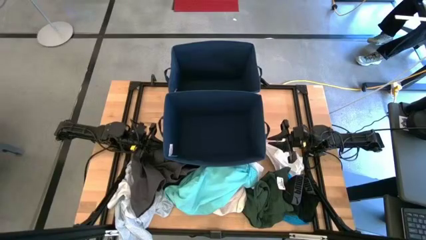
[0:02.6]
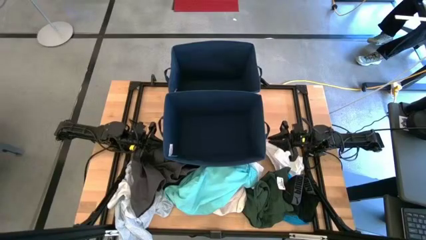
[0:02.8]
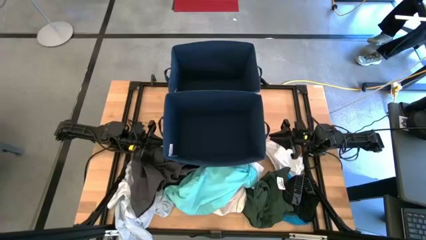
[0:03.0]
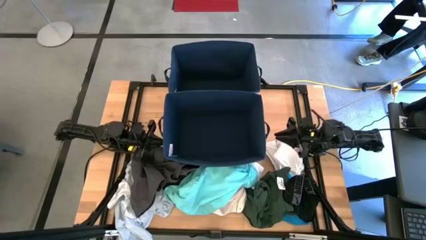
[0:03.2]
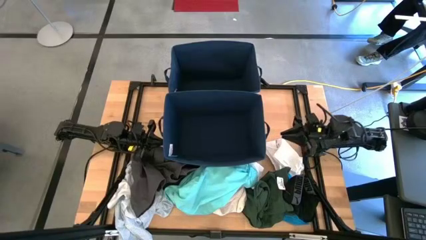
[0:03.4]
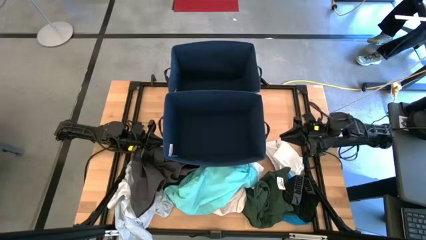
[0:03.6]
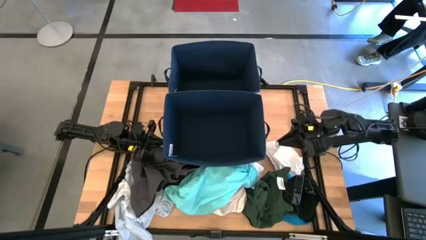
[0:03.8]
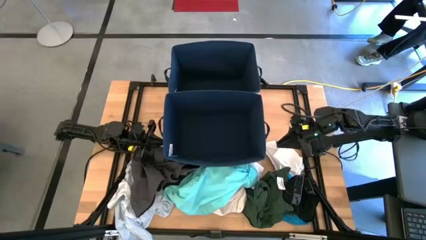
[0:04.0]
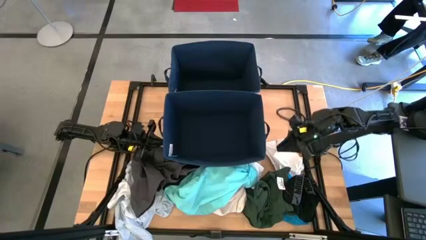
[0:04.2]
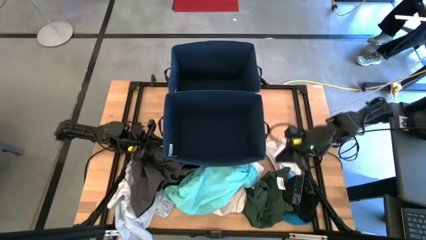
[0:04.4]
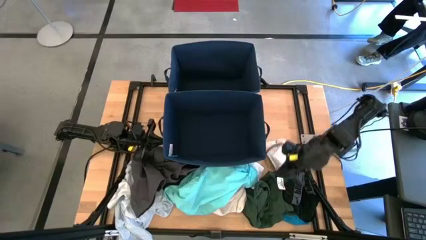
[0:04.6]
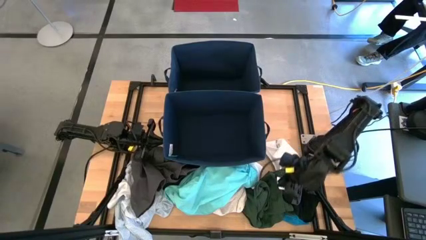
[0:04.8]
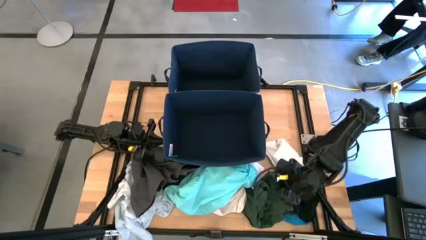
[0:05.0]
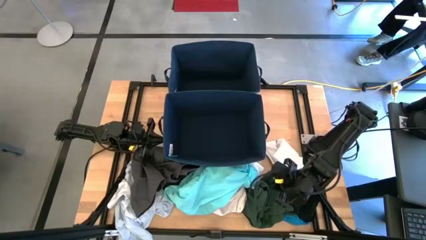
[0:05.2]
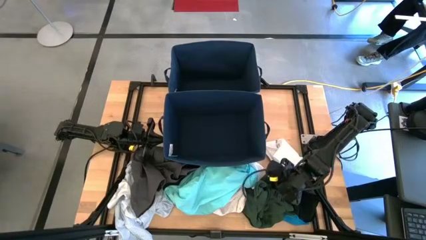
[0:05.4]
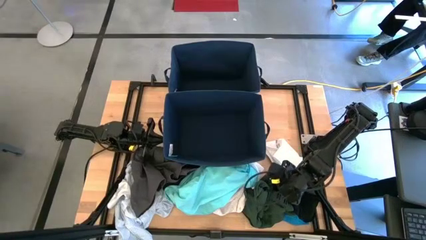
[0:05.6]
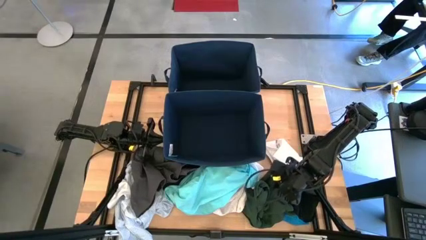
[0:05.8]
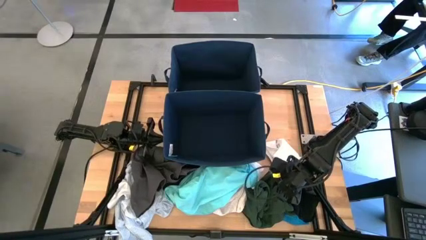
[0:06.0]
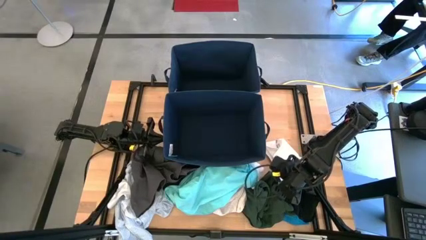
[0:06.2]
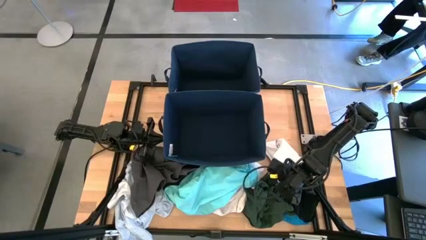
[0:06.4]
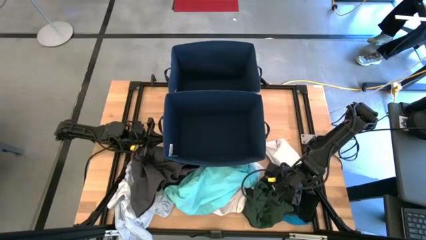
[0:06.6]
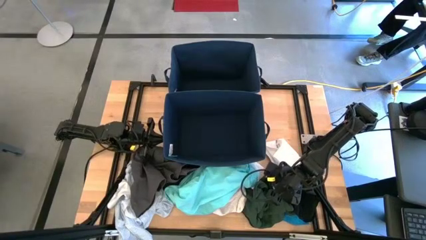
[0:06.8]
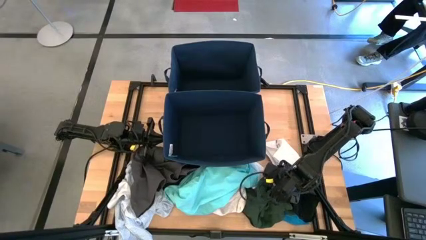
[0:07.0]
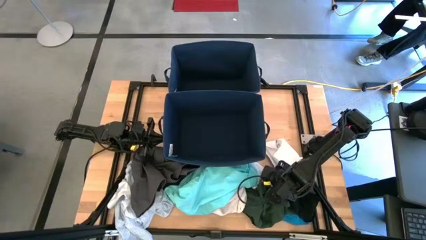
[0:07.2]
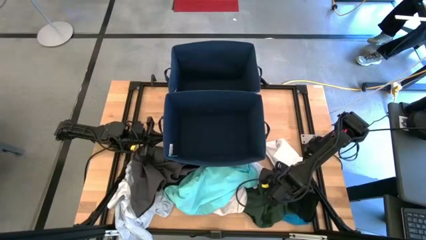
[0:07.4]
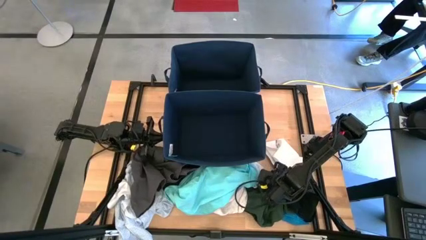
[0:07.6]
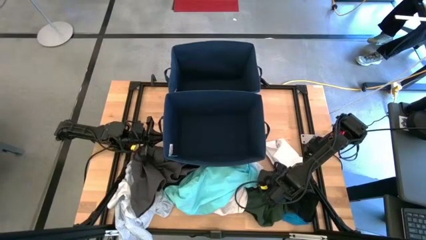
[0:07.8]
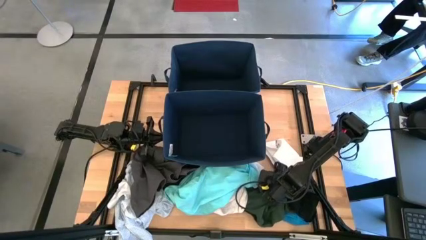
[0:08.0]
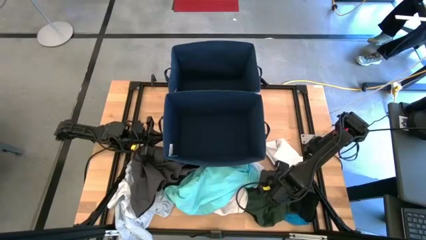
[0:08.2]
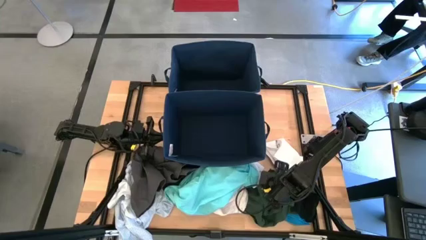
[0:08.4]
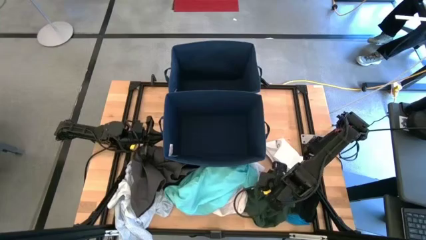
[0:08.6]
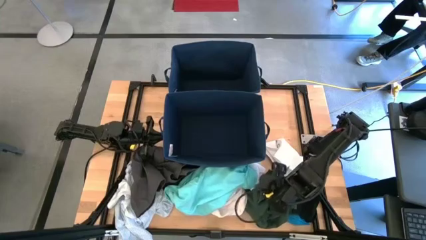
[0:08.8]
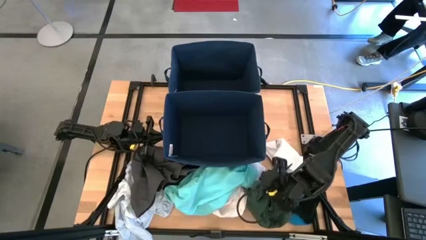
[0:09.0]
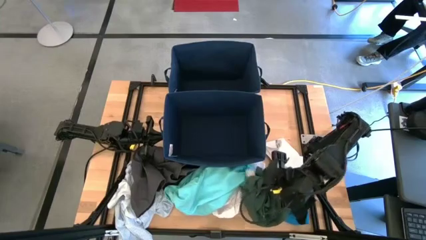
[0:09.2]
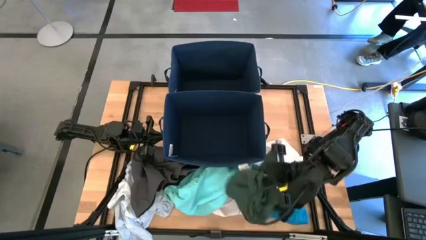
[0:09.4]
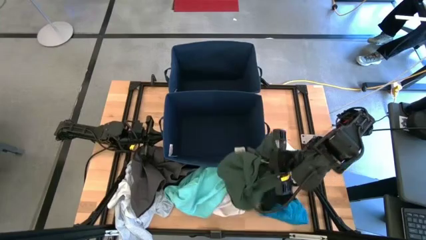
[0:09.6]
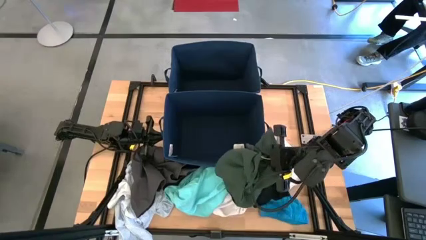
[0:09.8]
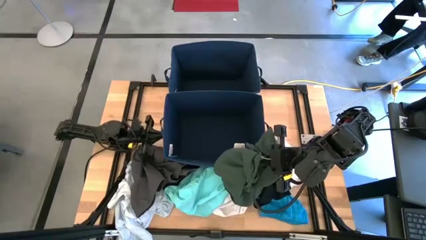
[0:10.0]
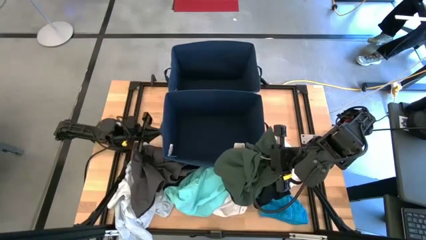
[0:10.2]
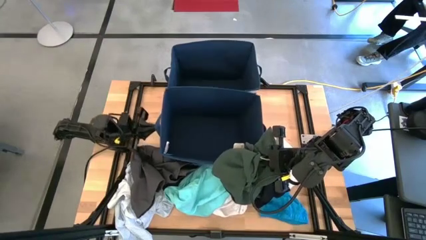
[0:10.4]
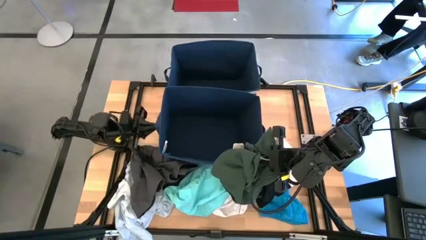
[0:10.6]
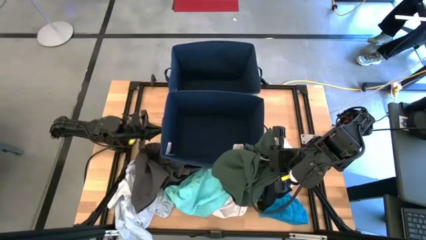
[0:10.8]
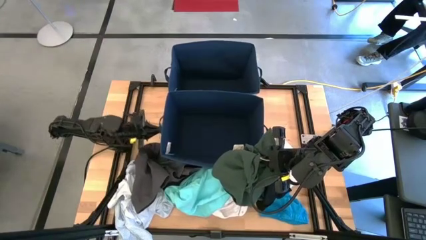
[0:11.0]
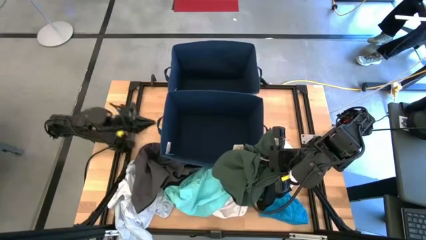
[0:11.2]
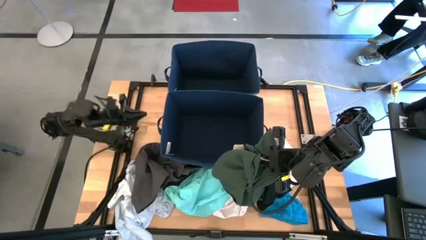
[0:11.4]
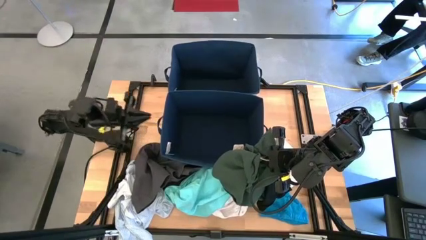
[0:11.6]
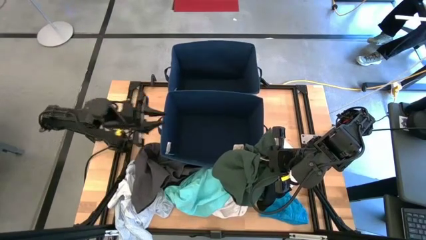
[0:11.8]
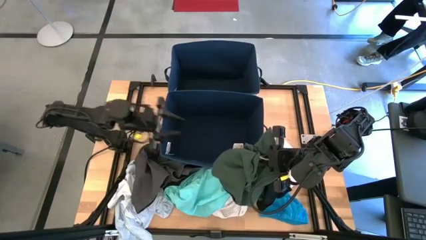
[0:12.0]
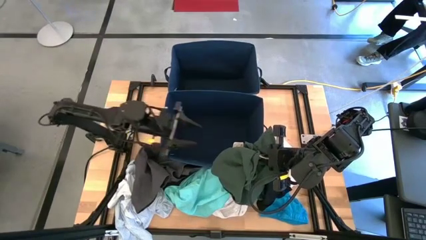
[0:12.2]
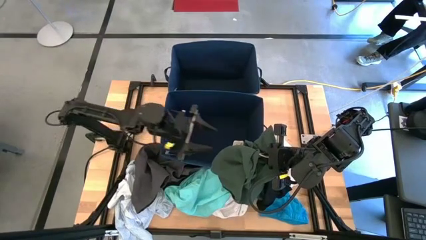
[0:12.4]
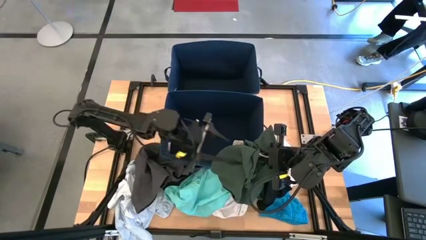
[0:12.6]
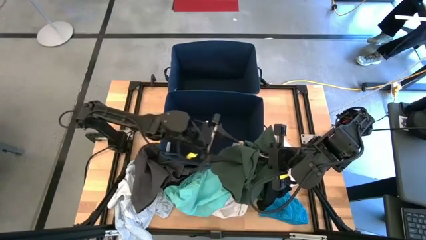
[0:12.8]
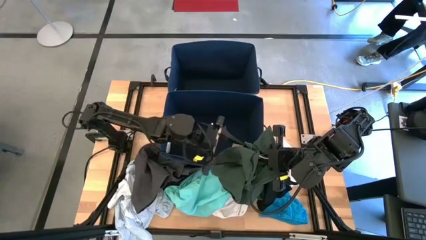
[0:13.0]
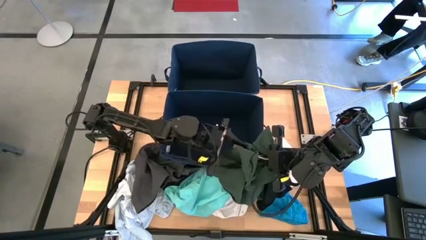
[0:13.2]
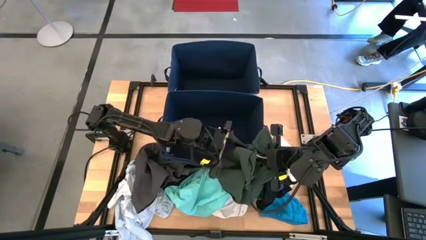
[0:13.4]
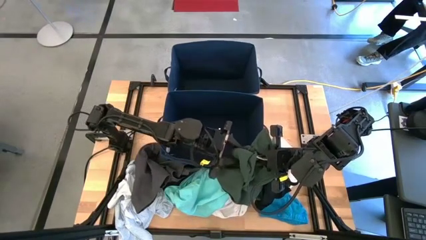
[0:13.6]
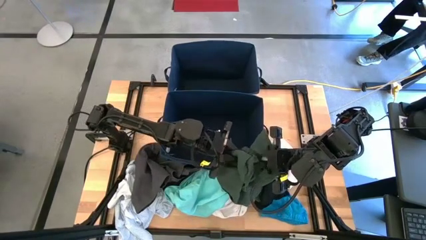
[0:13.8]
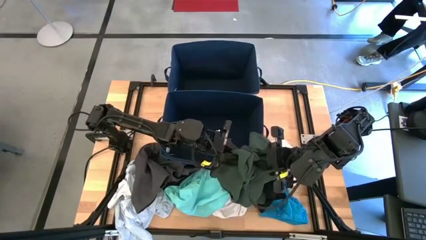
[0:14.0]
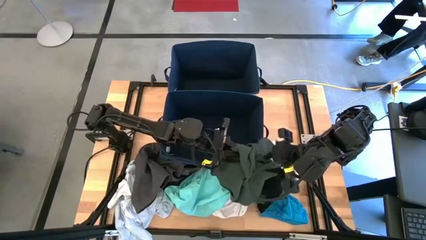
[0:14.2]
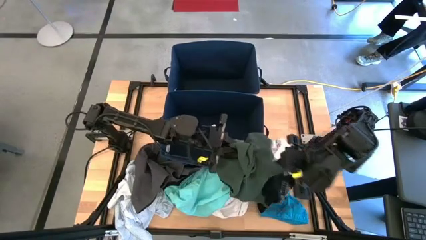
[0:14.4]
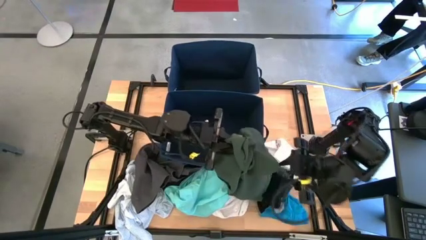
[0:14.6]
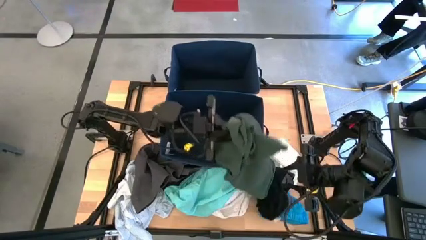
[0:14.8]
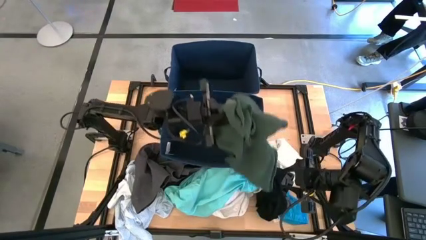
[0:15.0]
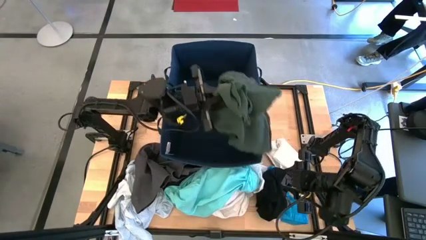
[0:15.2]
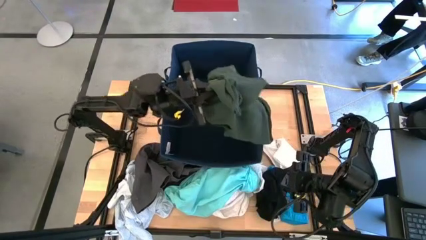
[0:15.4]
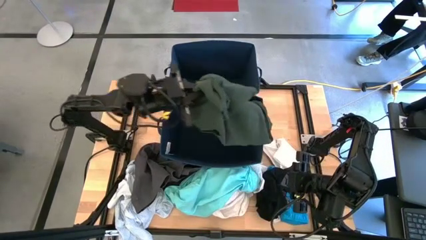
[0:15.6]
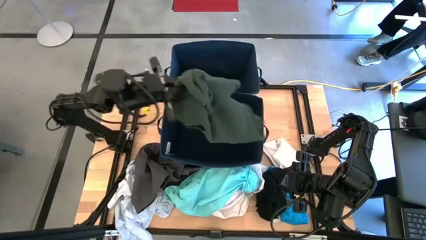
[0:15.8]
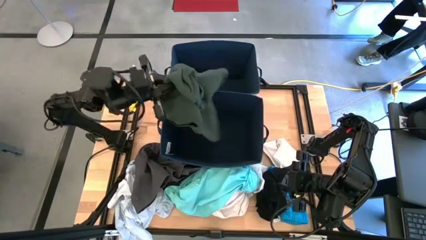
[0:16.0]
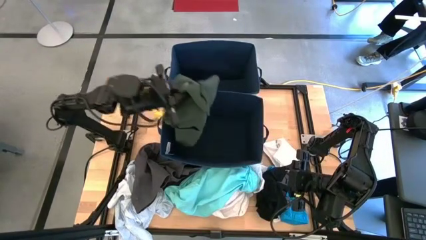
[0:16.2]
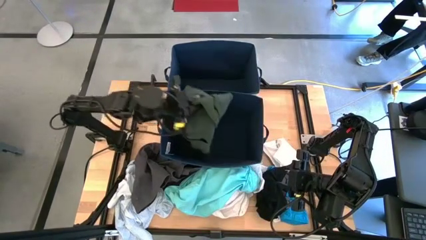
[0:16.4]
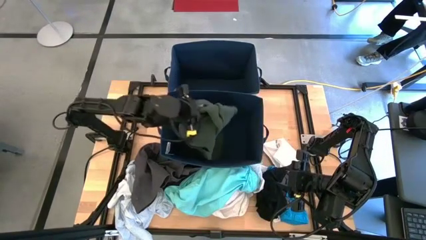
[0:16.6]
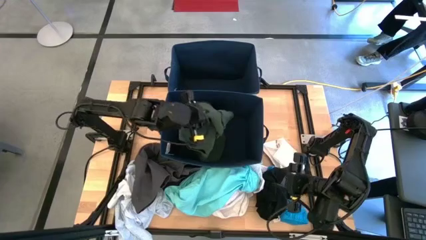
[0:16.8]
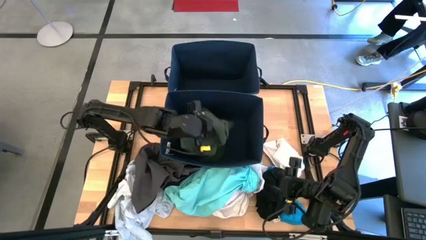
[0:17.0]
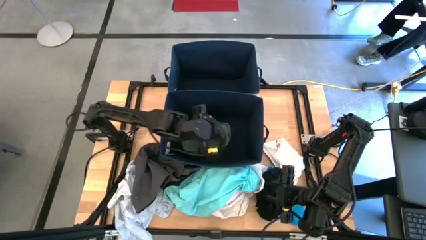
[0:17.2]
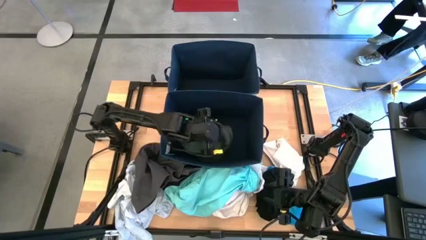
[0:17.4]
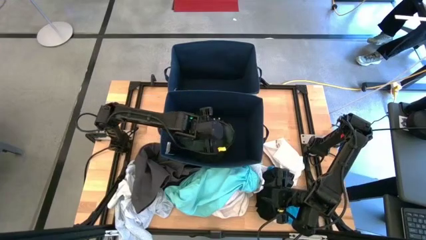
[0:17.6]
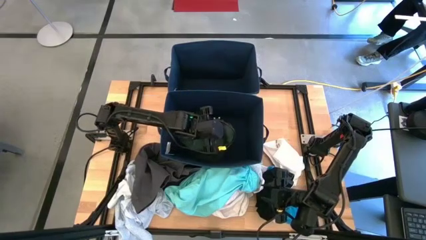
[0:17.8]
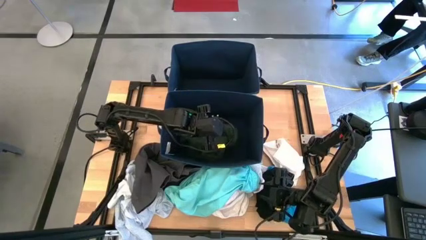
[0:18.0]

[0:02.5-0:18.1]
Task: Sort clothes
Put the green shirt into the bottom blue laundry bin
